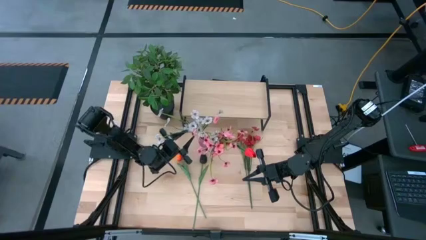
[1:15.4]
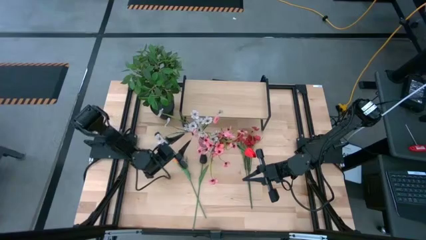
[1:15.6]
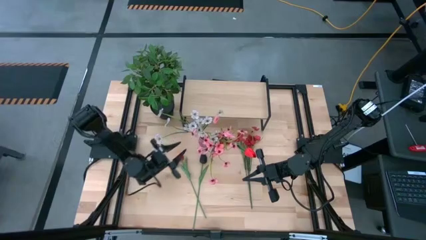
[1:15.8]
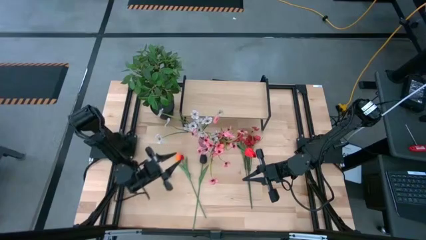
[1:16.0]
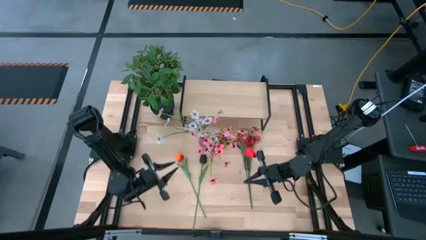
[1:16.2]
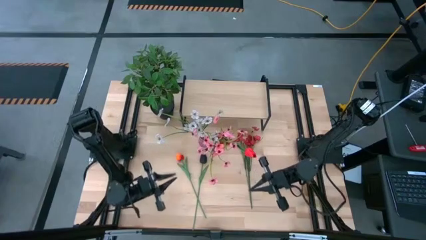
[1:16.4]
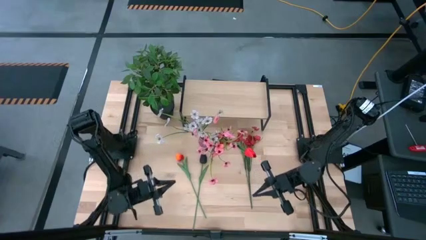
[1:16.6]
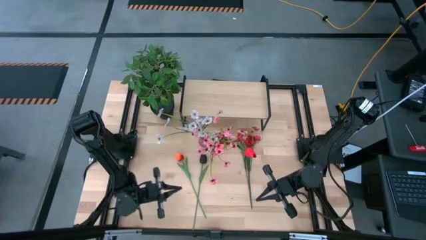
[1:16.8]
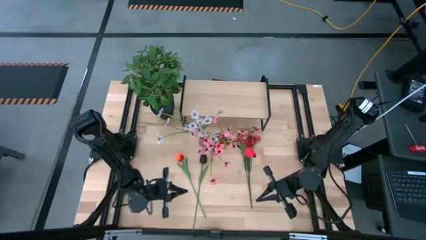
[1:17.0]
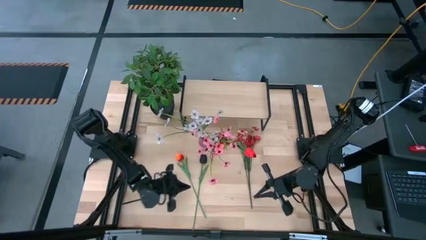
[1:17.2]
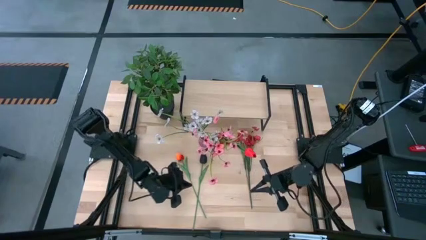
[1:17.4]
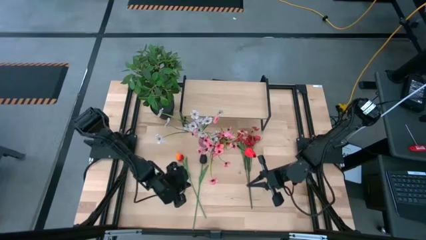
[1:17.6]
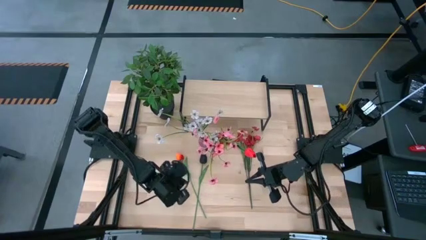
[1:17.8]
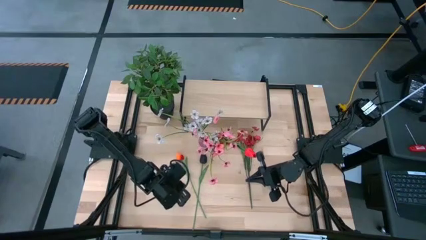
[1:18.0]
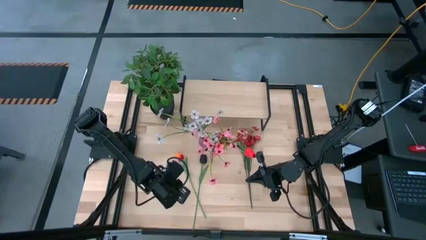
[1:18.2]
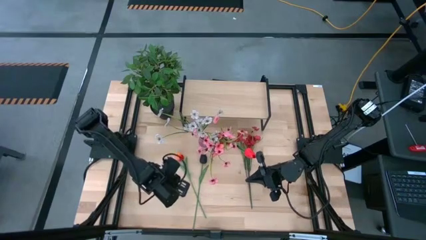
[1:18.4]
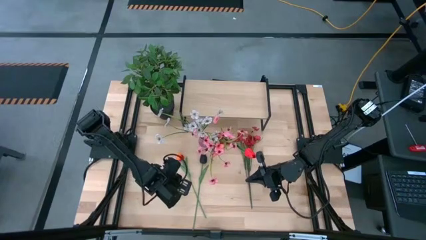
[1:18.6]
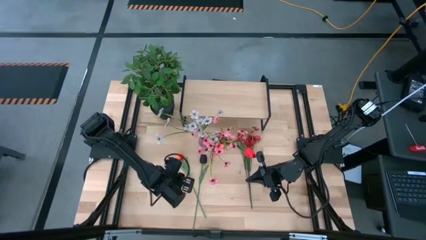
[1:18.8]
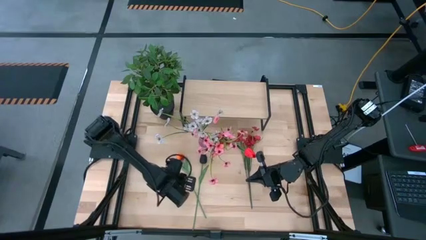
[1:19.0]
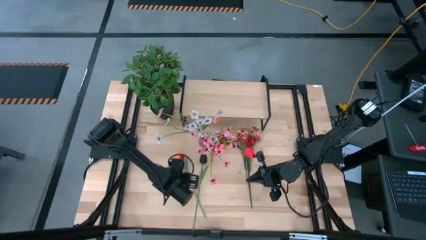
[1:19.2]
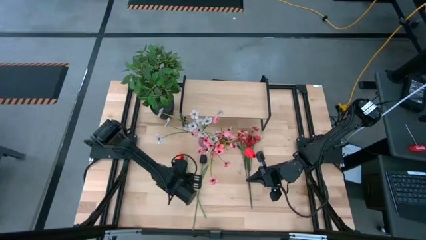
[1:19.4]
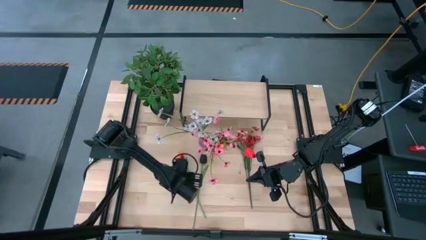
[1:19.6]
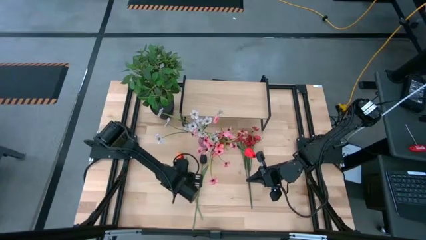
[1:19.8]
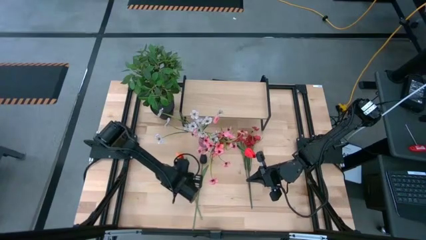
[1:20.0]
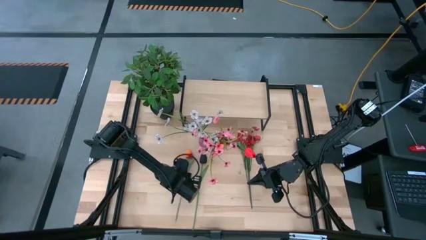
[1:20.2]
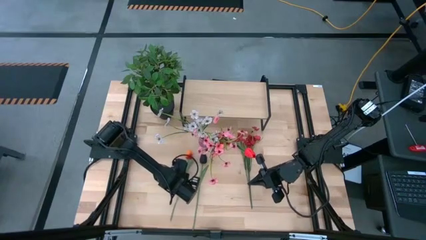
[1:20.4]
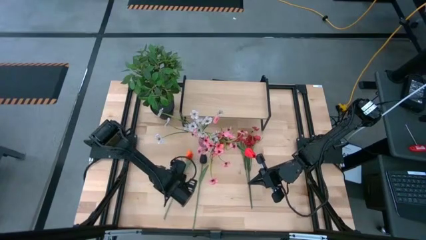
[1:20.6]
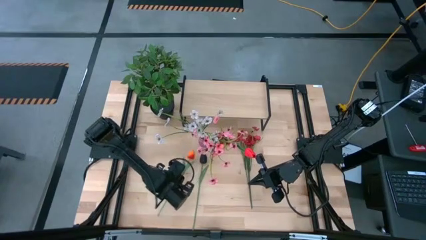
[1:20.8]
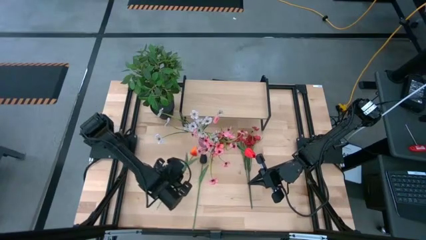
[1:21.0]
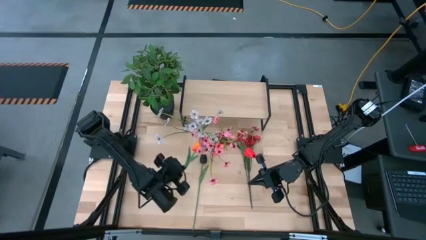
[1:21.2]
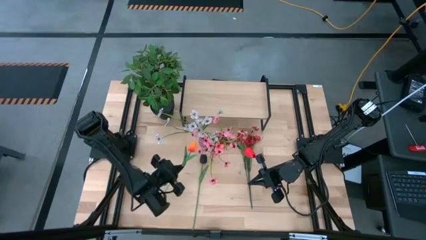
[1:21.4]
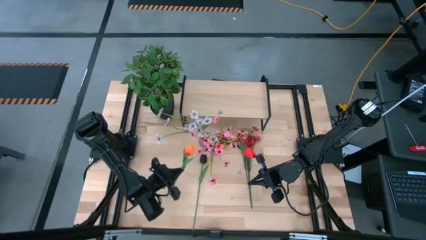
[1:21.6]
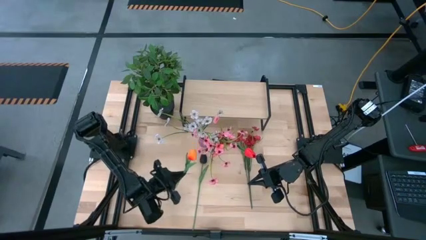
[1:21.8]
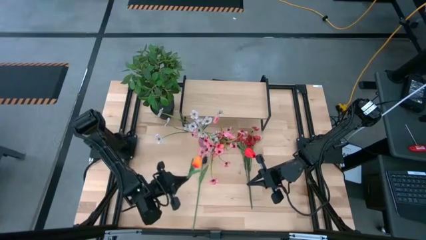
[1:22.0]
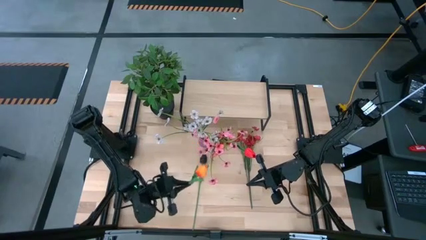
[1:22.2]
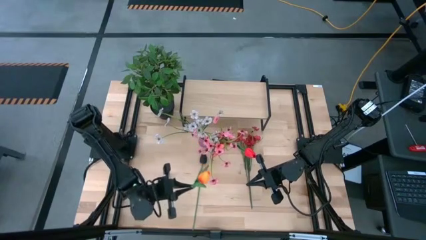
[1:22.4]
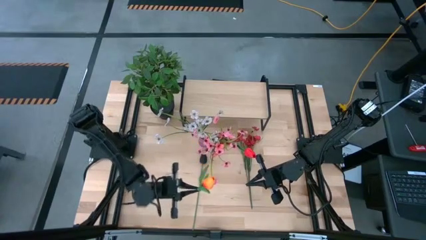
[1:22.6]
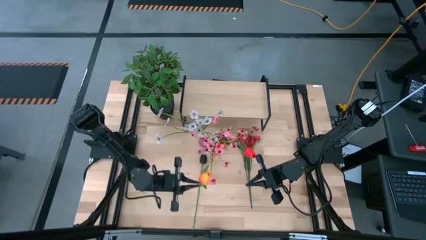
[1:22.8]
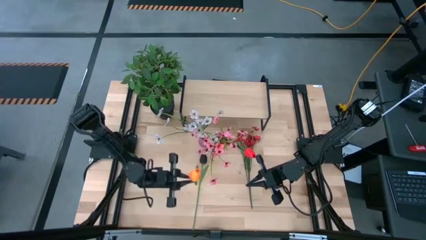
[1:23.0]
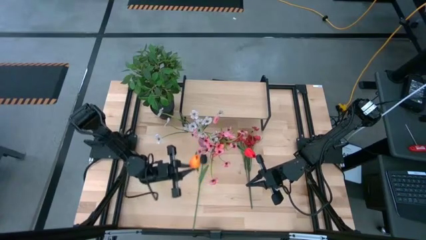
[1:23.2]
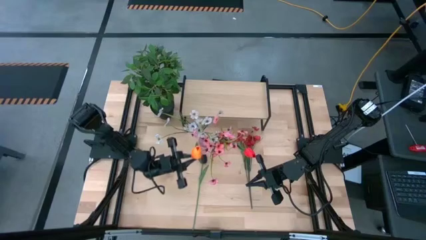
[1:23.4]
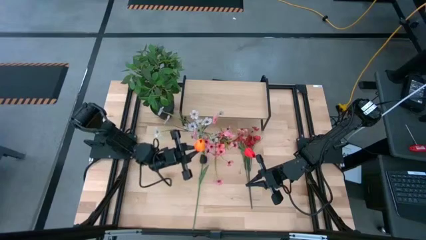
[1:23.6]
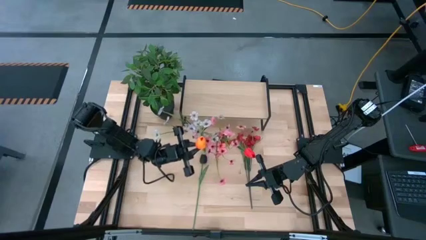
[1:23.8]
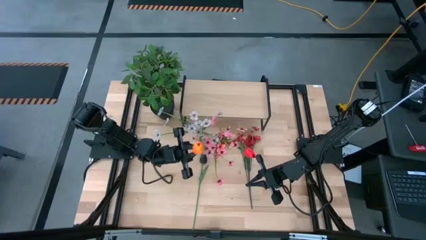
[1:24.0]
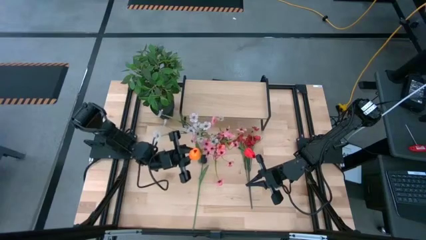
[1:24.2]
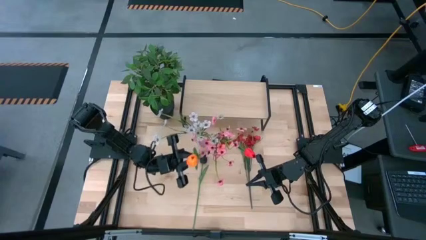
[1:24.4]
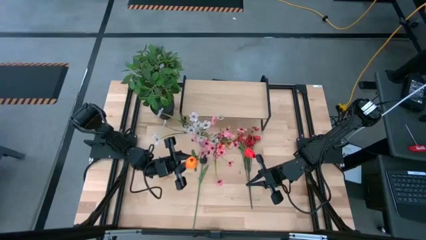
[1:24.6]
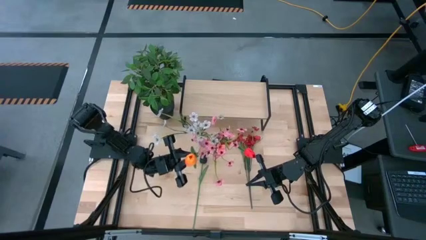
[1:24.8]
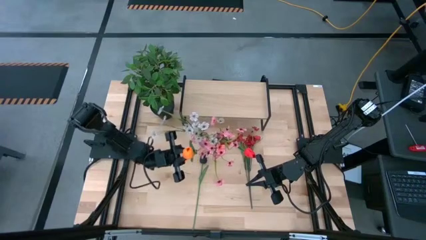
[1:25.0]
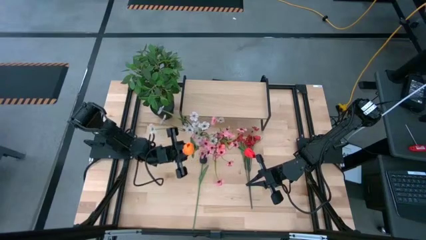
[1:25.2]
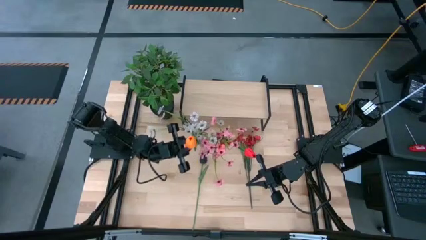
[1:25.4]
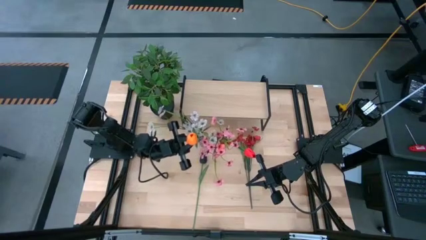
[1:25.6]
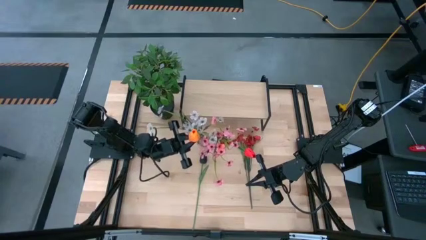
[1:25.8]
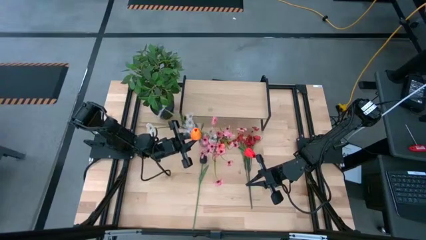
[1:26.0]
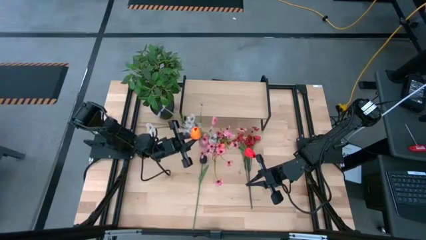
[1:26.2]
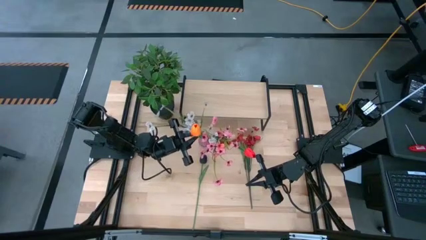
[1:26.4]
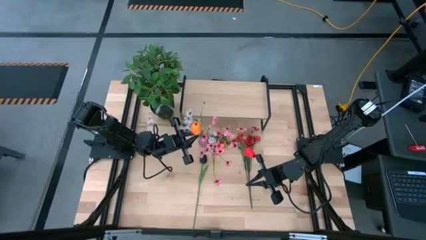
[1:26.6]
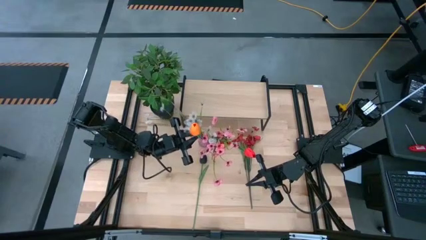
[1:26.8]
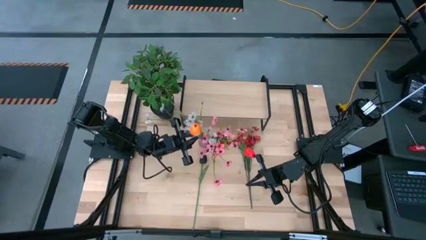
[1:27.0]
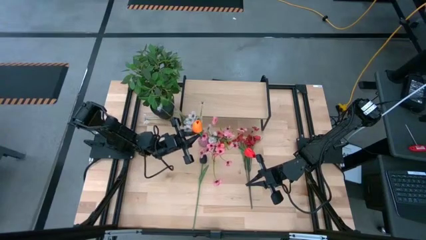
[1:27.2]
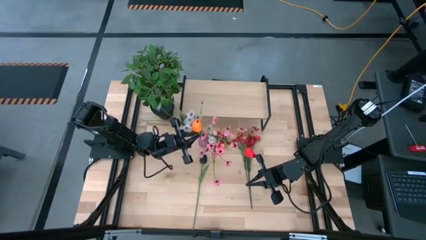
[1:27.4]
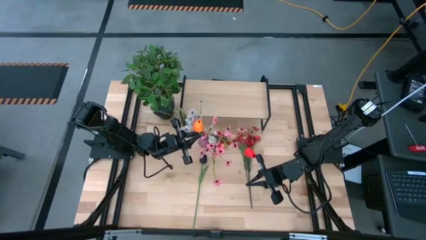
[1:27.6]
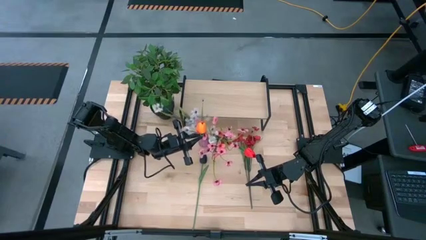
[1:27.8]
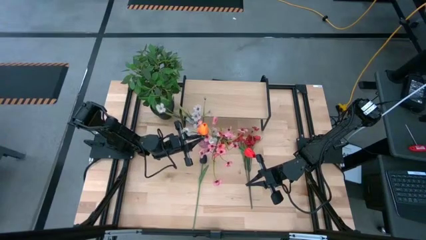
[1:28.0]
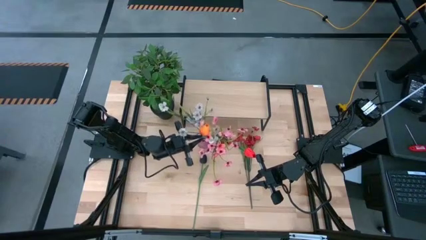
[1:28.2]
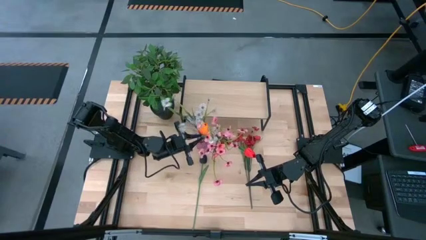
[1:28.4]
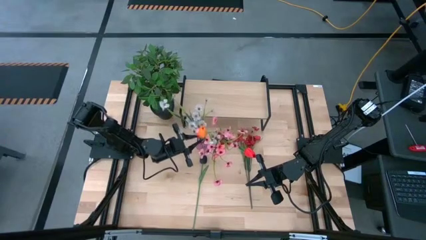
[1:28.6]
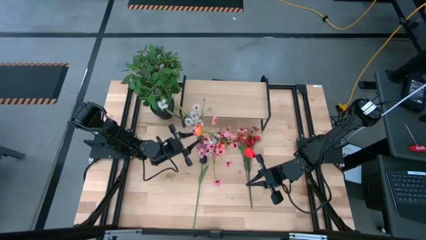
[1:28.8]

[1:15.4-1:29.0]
Task: Pick and place flowers into a vace then onto a shelf
Put the orange flower into the purple vase

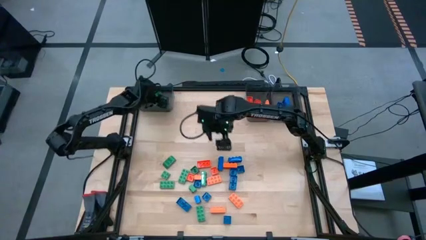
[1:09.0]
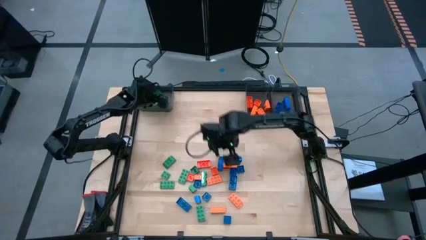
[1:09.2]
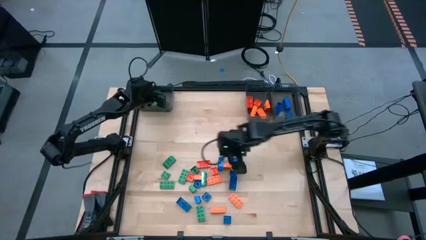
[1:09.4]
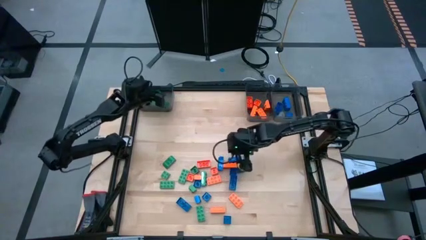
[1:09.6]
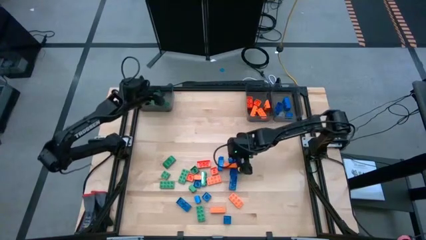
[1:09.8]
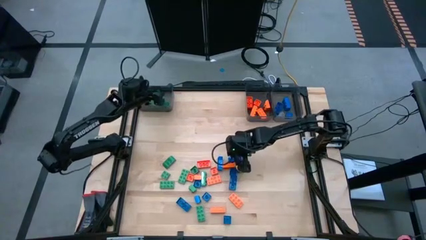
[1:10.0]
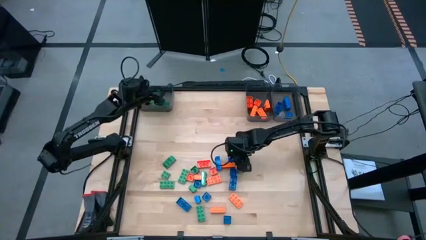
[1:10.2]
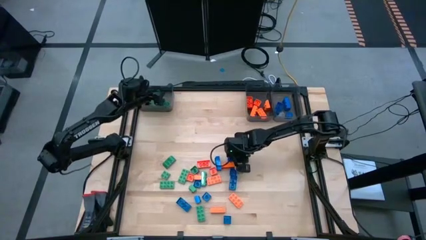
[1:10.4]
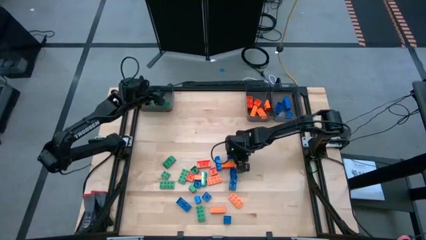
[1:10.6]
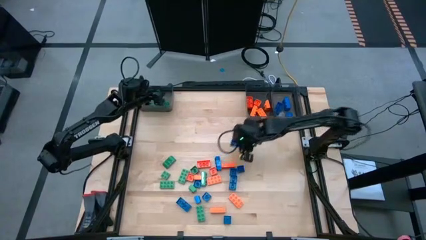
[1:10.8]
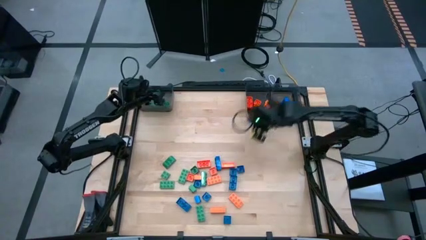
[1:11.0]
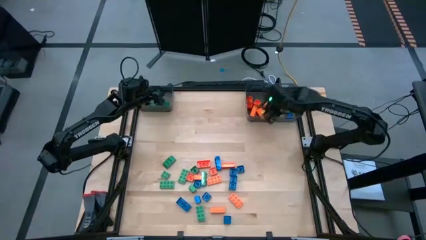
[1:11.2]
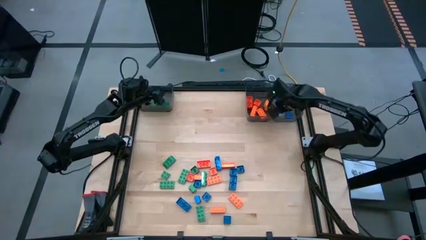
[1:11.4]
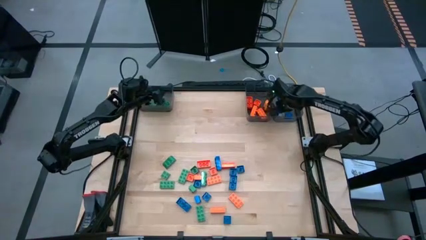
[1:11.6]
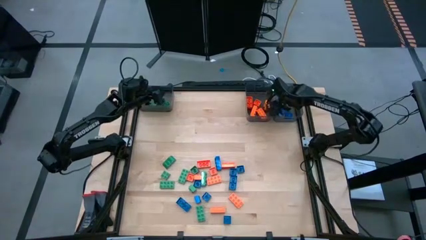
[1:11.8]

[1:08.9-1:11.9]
Task: Sort blocks
Put the blue game piece into the right black bin
